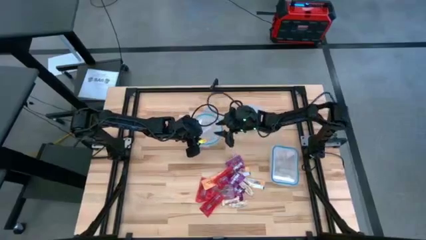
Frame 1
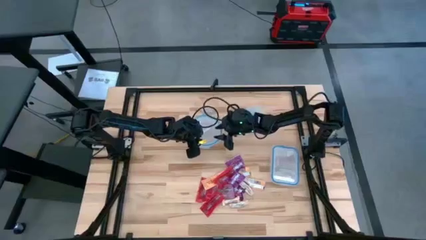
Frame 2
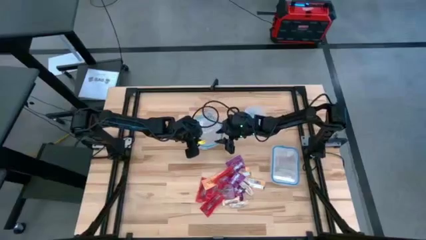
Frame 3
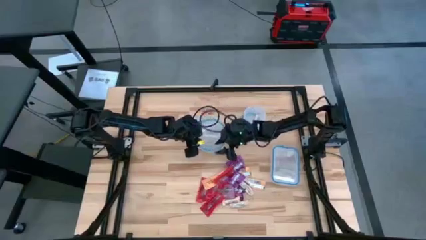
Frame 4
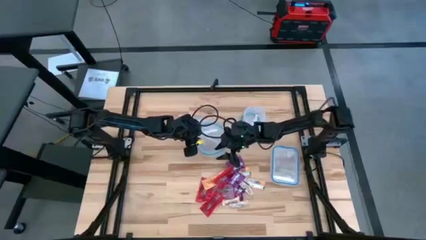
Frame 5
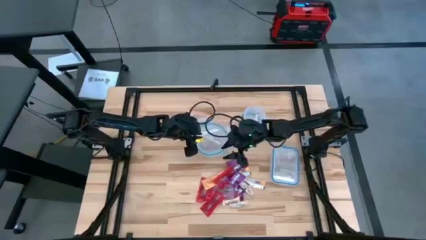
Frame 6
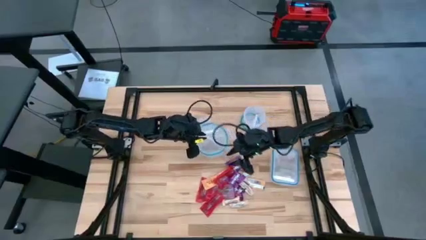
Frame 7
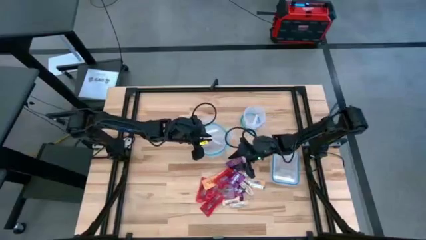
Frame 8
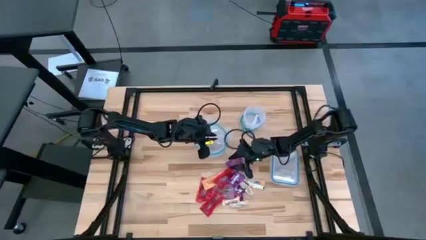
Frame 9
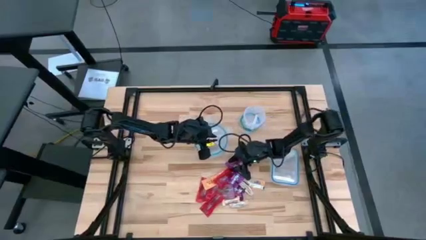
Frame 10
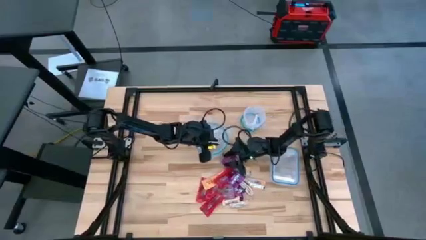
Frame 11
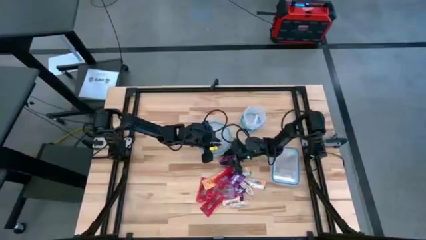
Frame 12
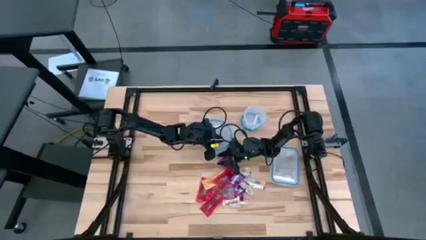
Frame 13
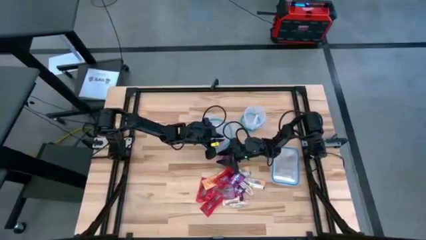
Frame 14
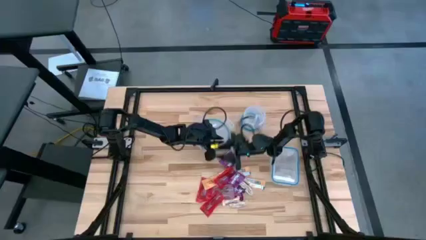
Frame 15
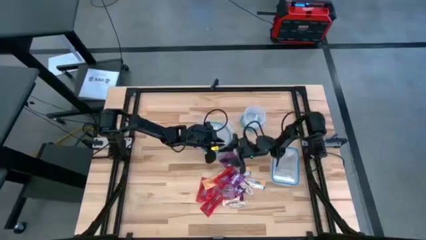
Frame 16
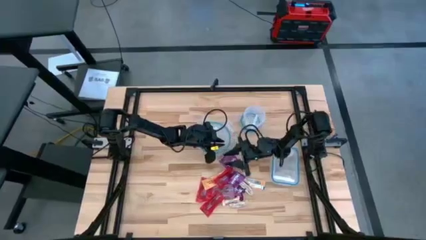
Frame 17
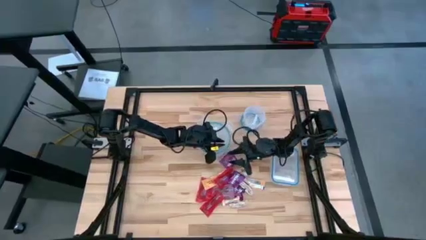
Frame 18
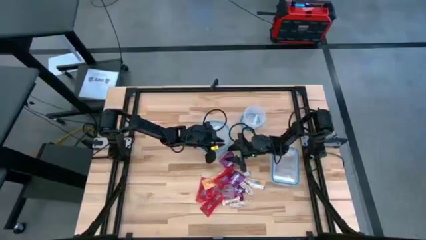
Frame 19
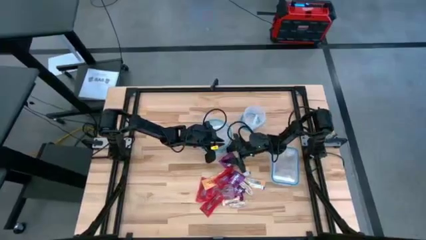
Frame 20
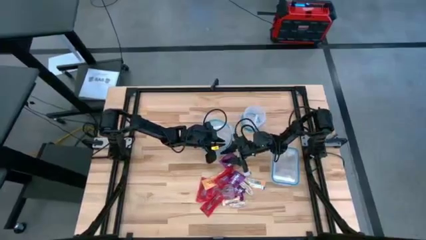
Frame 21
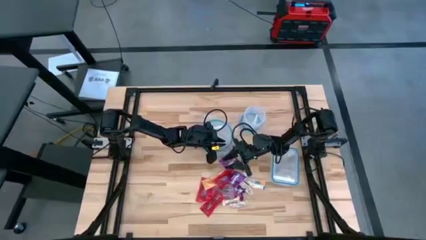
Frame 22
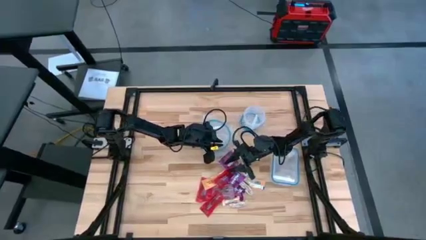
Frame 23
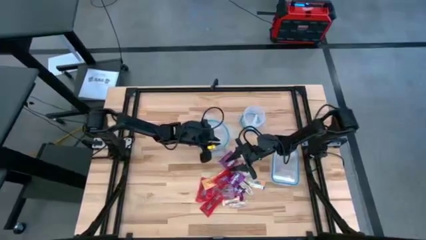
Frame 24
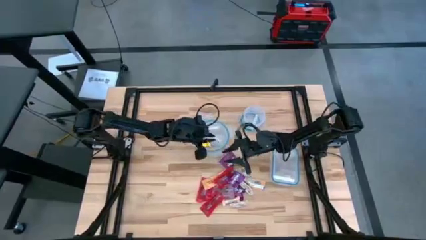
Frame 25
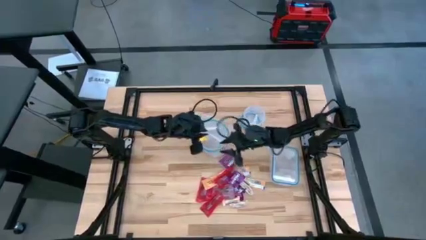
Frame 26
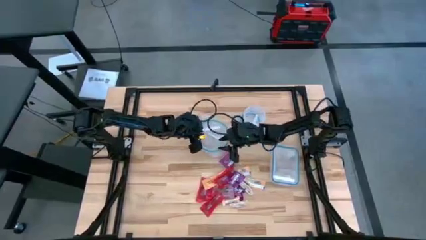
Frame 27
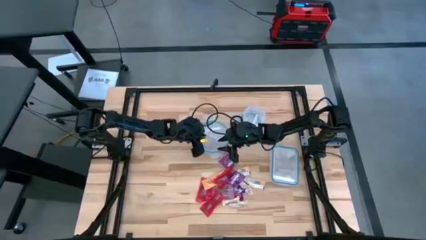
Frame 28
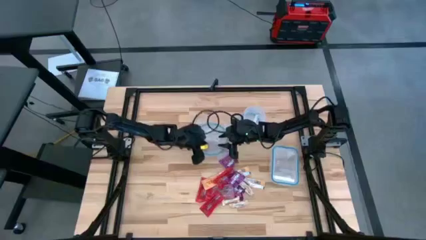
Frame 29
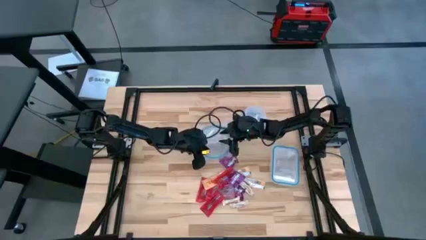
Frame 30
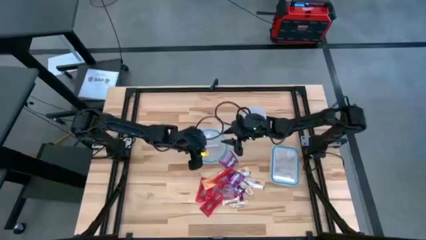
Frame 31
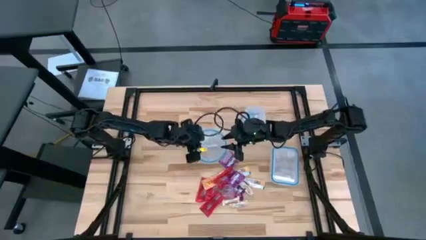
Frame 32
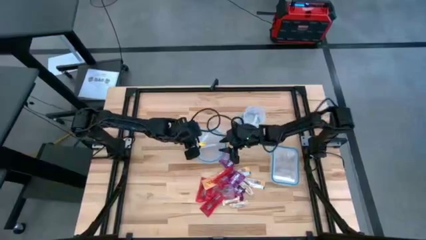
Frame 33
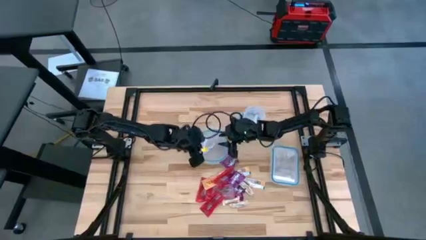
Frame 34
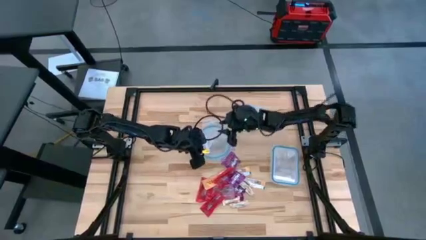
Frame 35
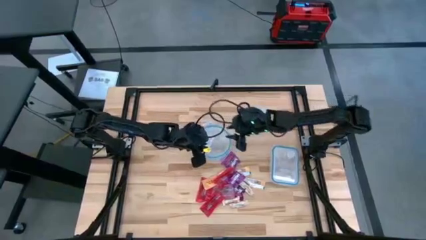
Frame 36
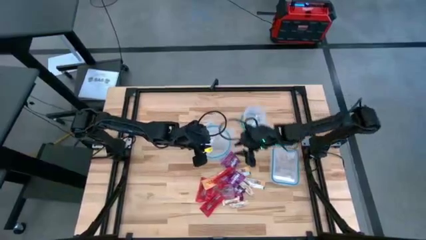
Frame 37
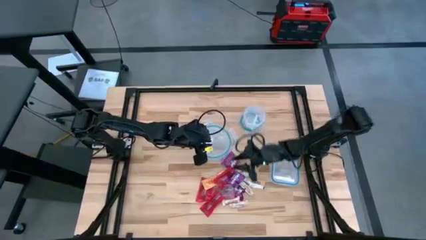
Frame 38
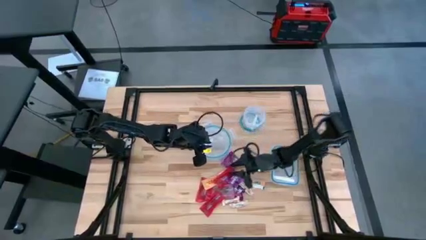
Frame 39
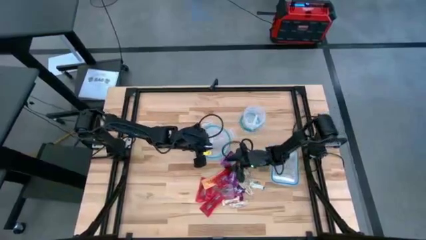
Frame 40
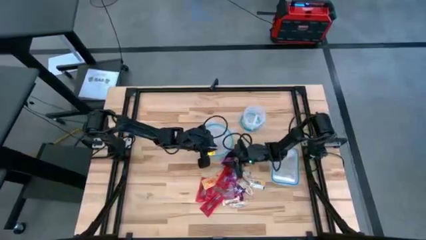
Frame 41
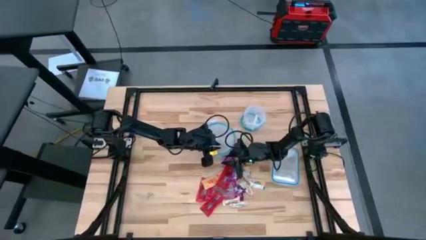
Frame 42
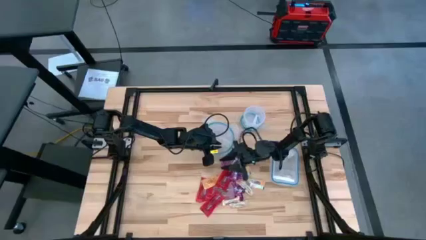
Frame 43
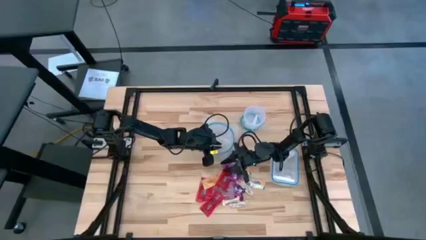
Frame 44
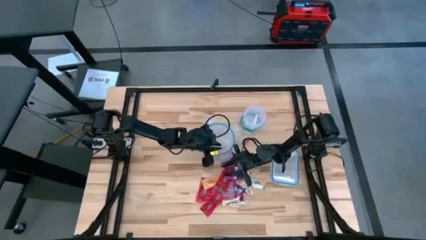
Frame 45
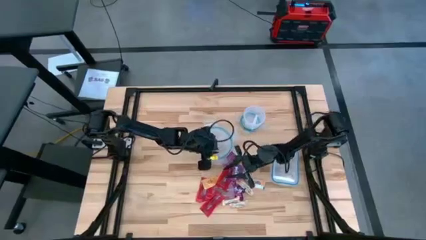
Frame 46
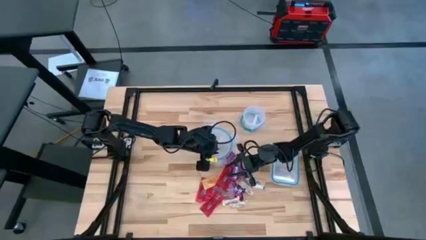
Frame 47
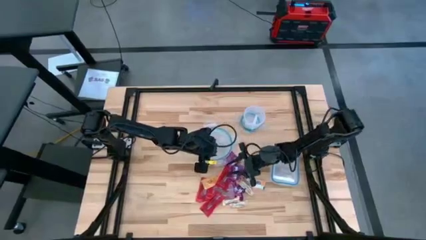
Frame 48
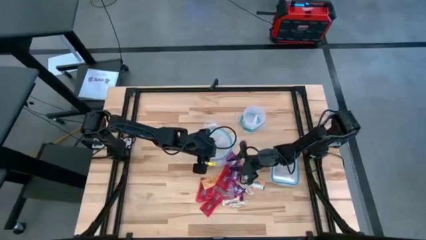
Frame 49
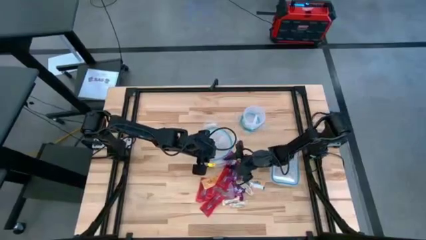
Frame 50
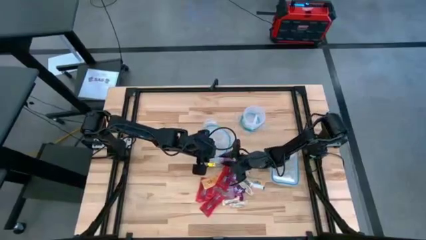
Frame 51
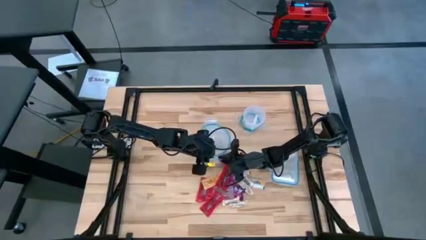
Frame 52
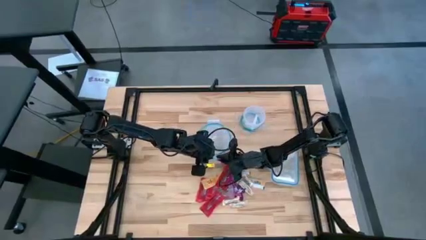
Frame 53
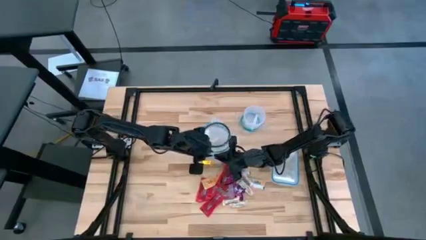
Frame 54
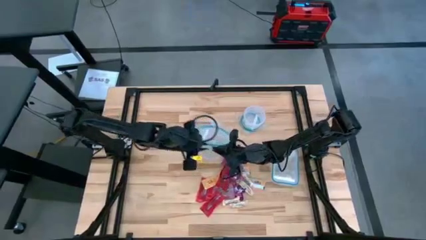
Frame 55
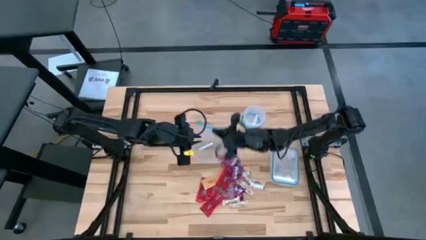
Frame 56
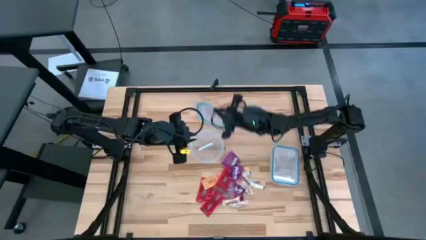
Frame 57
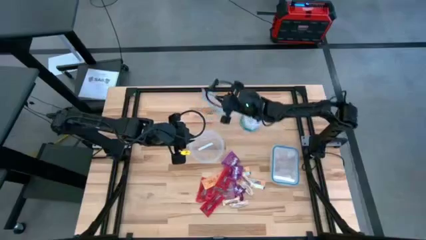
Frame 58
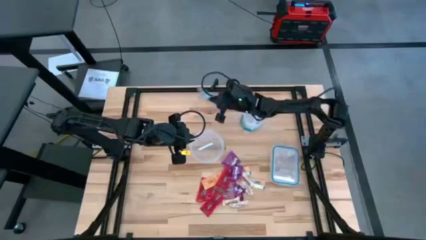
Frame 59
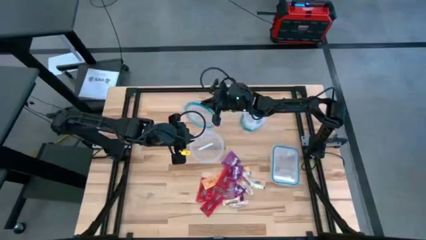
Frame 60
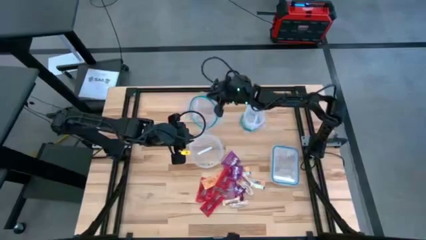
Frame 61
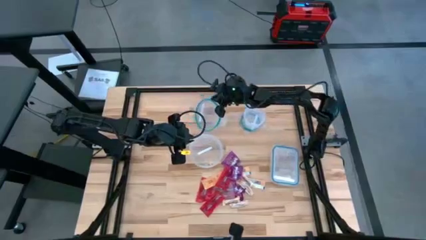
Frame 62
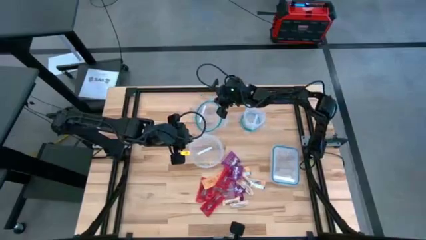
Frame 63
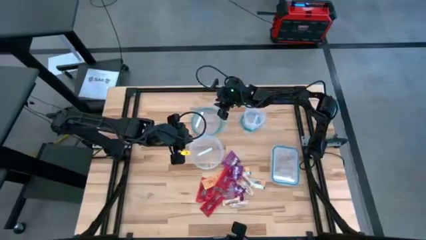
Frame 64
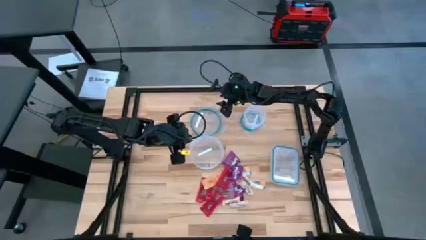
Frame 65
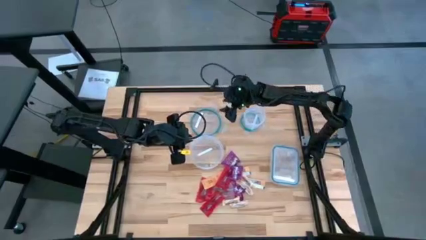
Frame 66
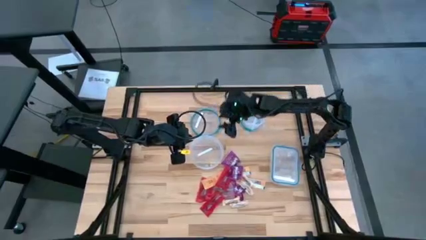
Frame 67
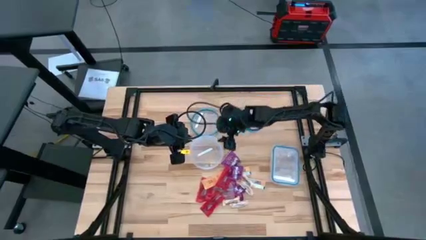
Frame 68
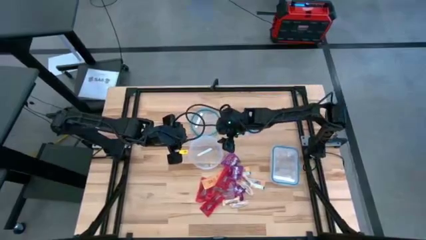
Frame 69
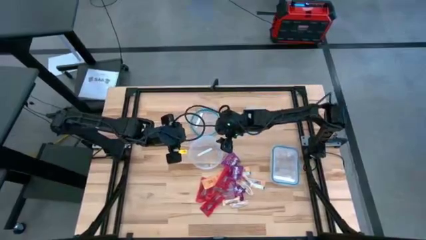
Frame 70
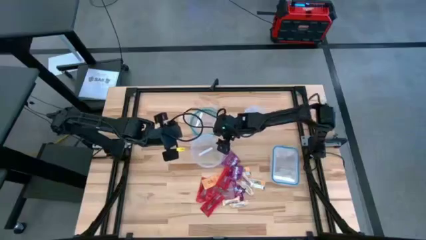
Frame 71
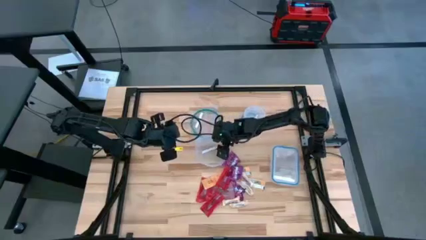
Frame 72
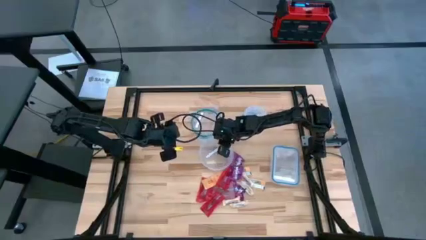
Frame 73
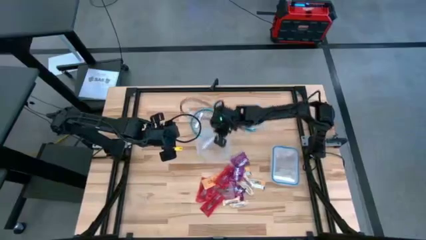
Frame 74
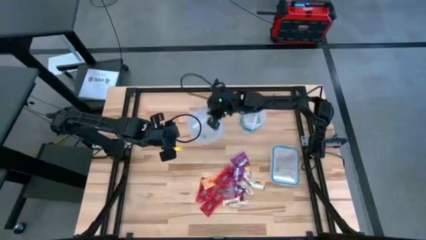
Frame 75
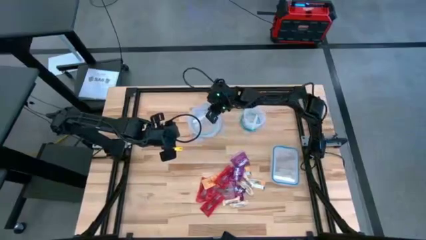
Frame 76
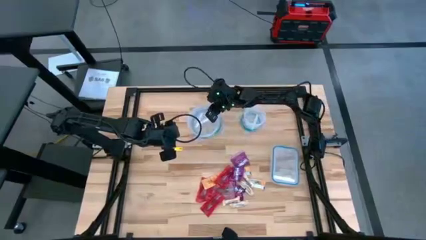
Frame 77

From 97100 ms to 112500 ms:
Task: Sort candy
Open the big circular transparent bin
